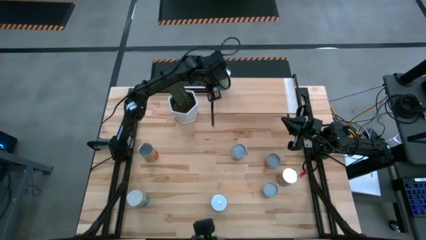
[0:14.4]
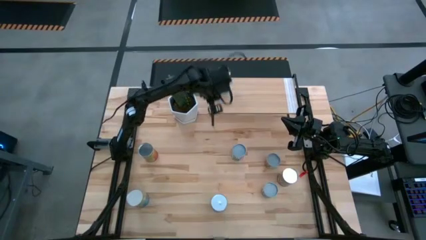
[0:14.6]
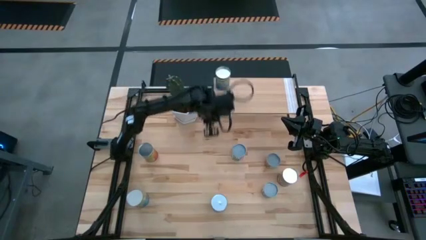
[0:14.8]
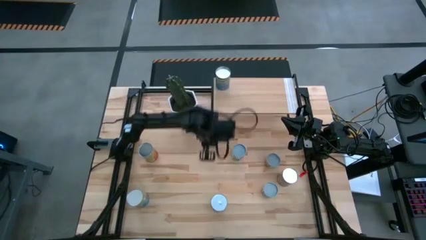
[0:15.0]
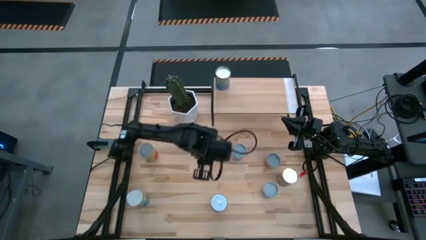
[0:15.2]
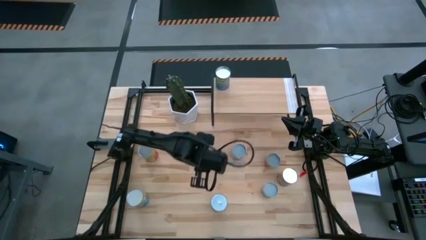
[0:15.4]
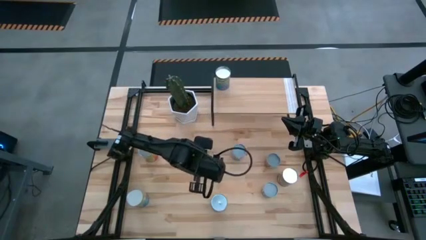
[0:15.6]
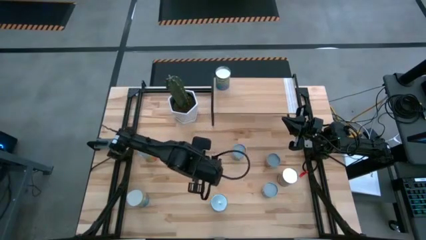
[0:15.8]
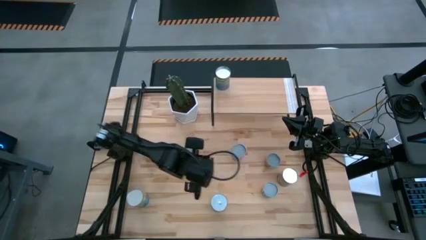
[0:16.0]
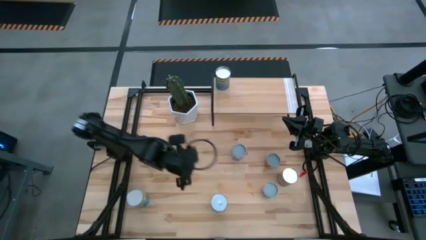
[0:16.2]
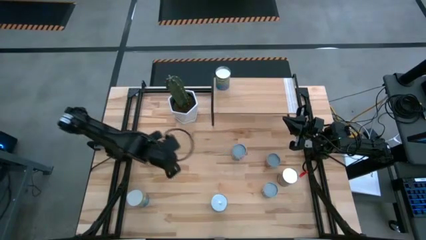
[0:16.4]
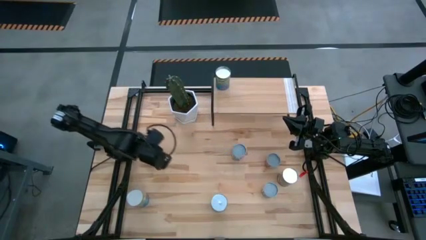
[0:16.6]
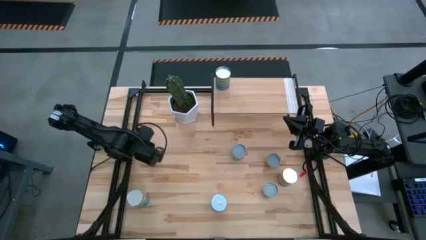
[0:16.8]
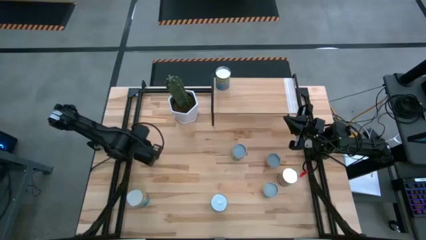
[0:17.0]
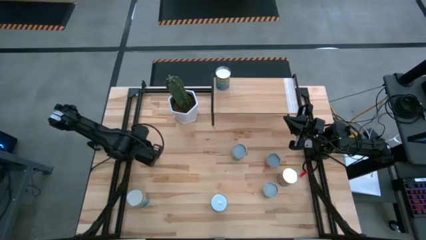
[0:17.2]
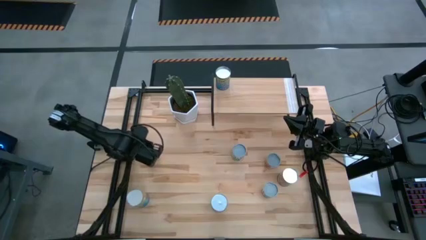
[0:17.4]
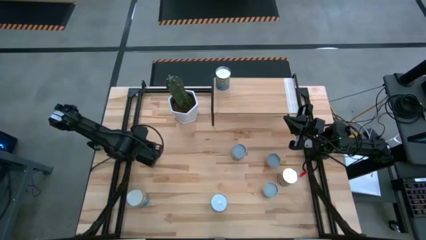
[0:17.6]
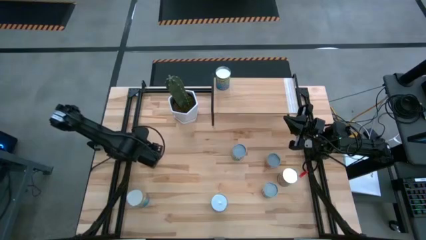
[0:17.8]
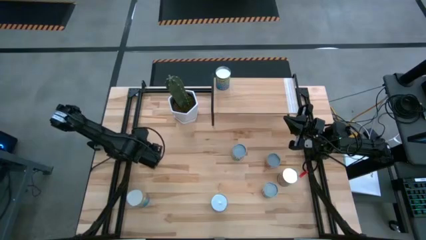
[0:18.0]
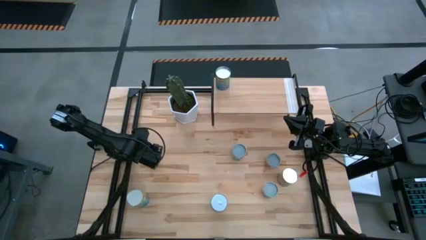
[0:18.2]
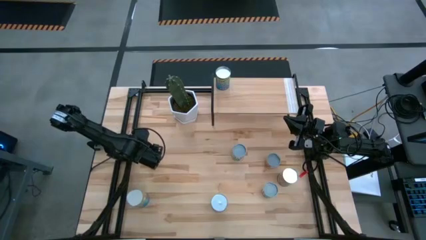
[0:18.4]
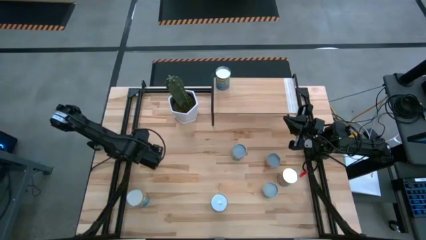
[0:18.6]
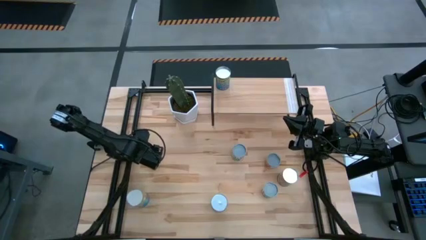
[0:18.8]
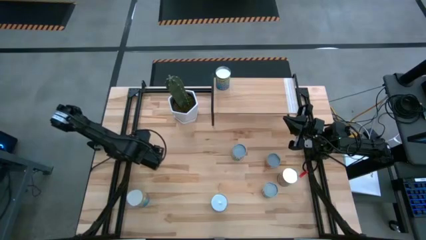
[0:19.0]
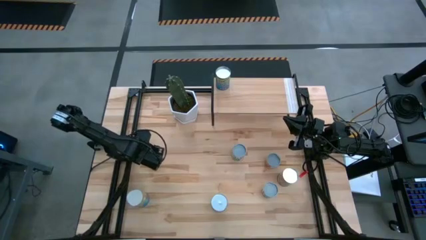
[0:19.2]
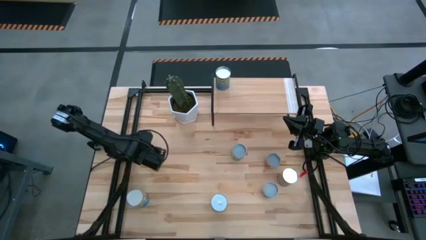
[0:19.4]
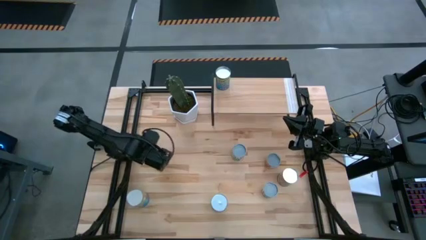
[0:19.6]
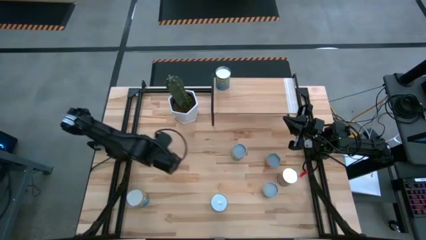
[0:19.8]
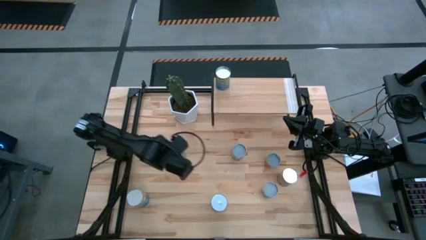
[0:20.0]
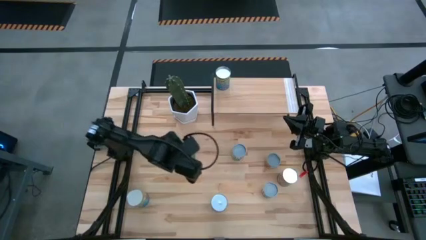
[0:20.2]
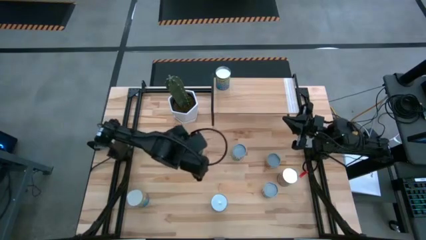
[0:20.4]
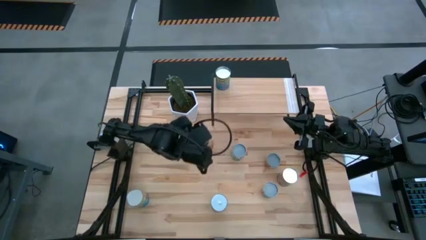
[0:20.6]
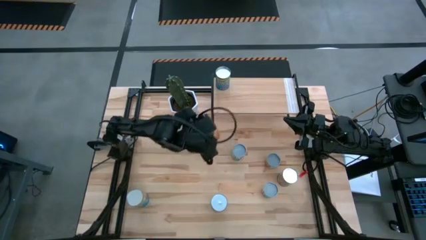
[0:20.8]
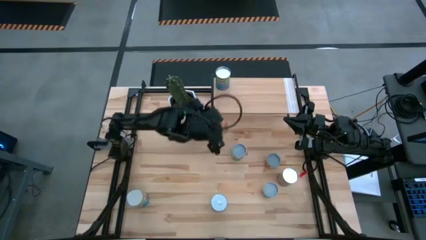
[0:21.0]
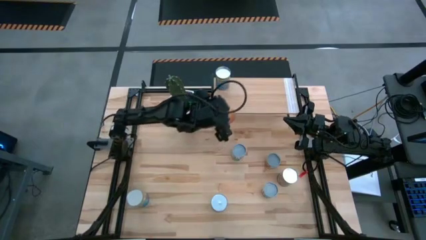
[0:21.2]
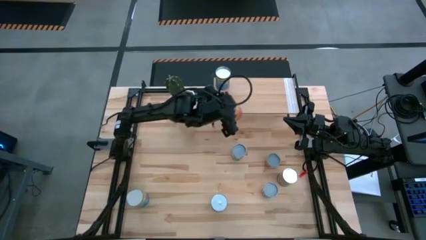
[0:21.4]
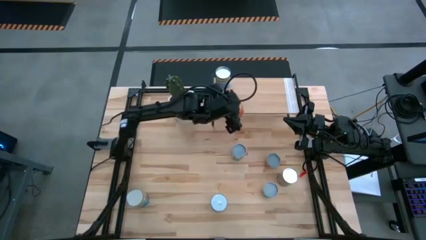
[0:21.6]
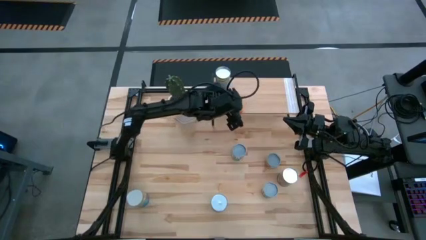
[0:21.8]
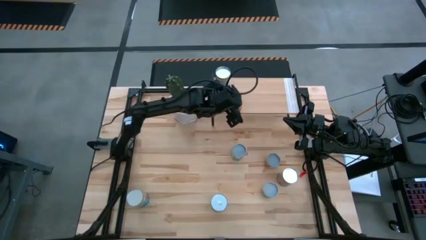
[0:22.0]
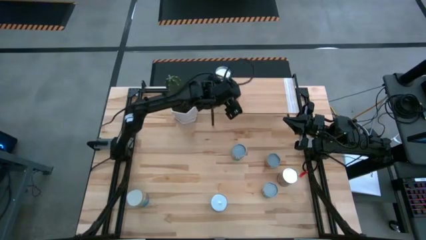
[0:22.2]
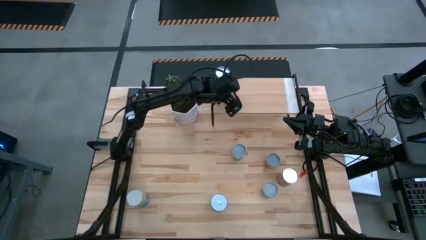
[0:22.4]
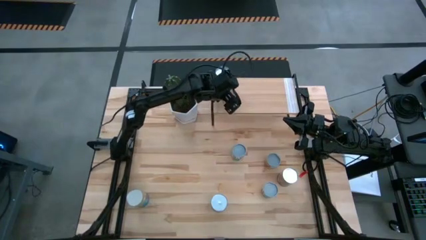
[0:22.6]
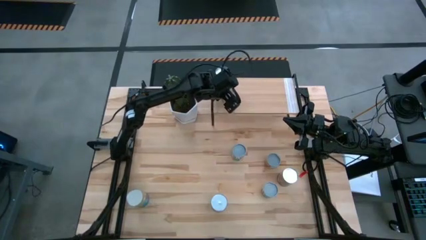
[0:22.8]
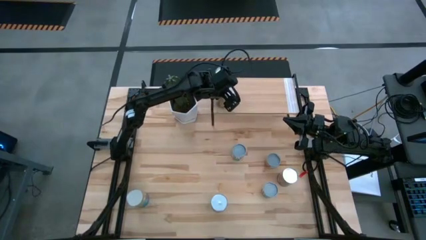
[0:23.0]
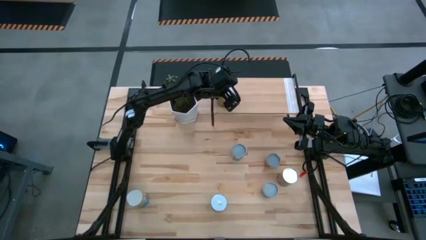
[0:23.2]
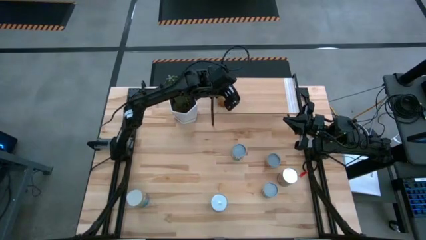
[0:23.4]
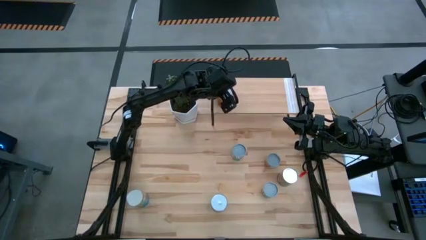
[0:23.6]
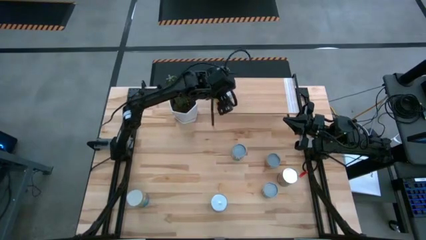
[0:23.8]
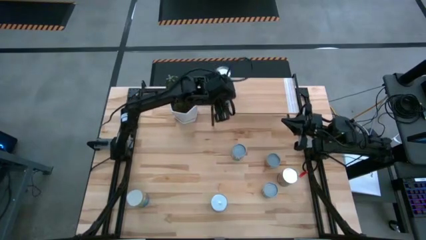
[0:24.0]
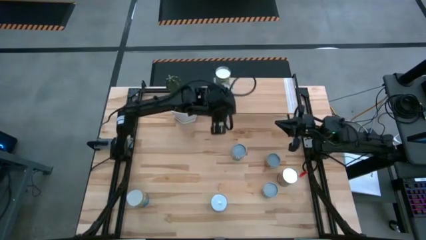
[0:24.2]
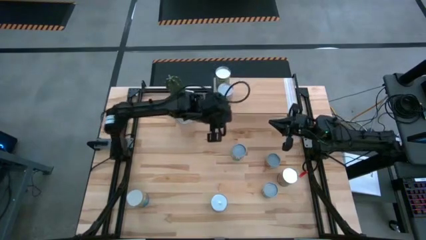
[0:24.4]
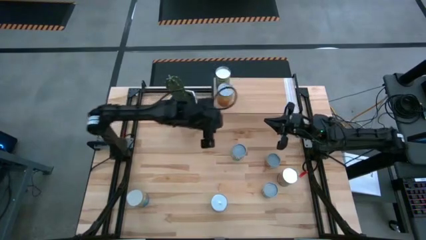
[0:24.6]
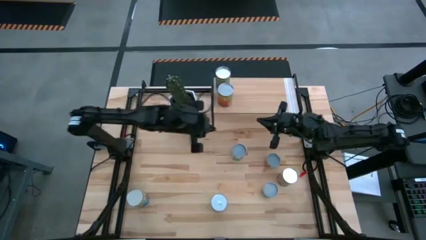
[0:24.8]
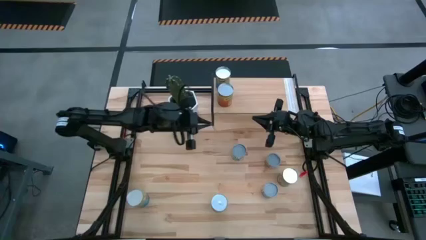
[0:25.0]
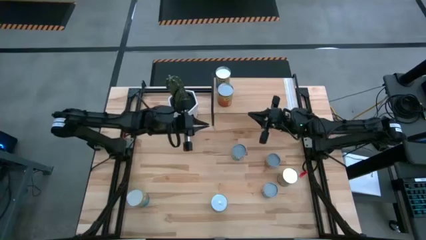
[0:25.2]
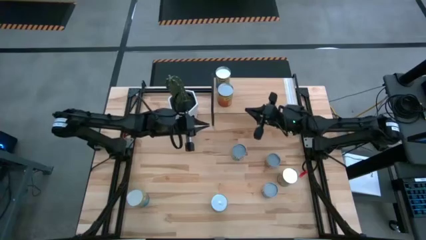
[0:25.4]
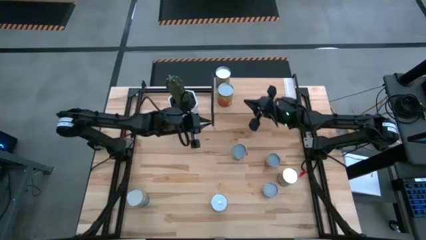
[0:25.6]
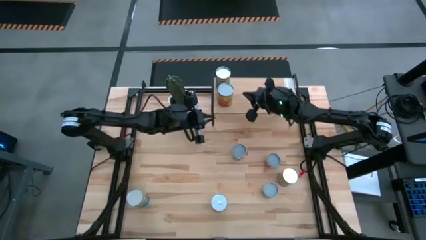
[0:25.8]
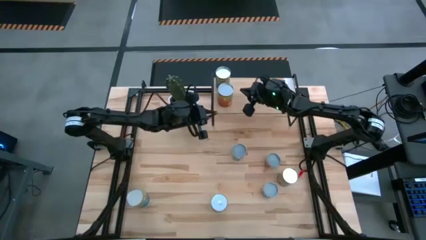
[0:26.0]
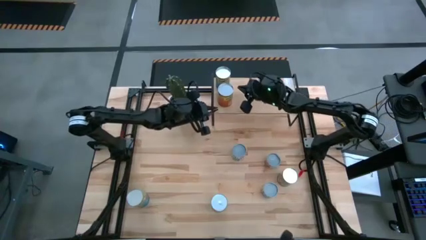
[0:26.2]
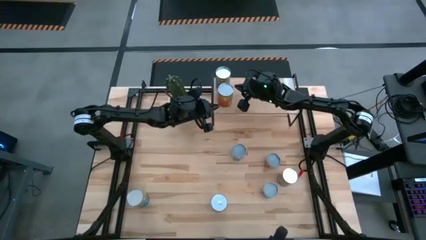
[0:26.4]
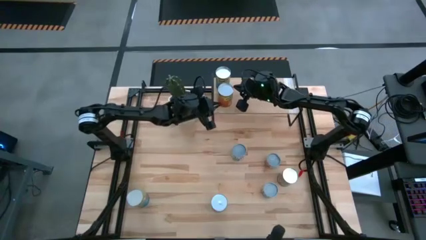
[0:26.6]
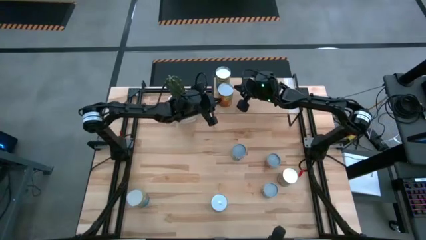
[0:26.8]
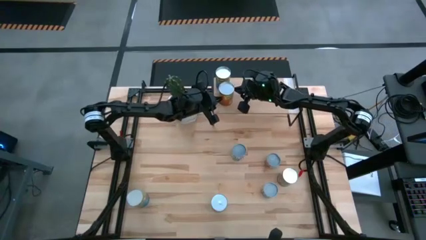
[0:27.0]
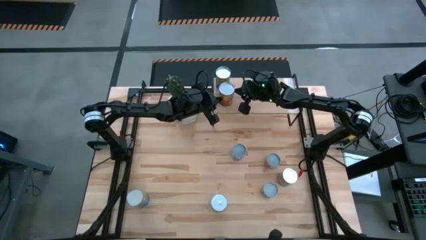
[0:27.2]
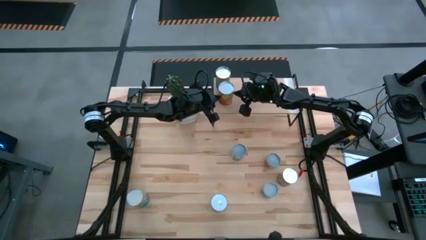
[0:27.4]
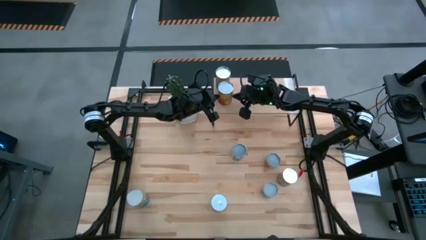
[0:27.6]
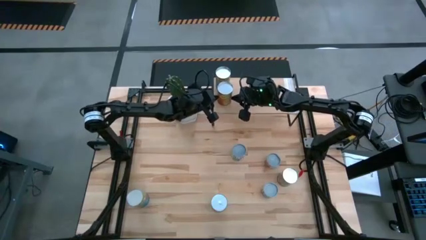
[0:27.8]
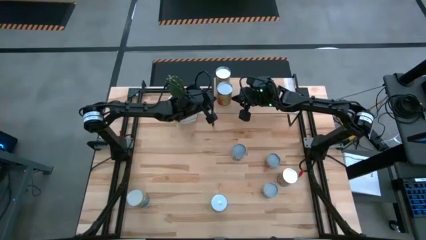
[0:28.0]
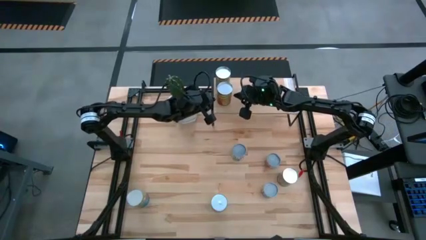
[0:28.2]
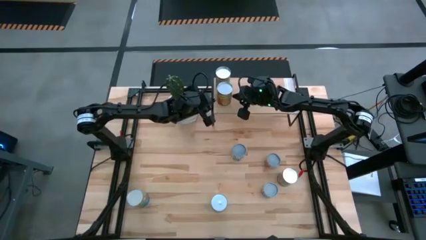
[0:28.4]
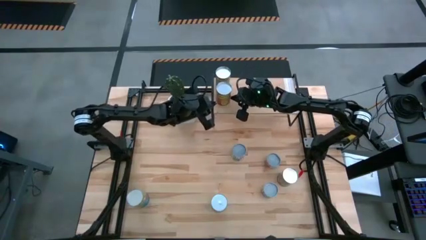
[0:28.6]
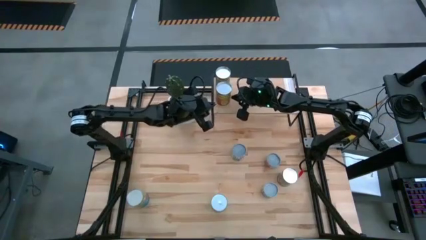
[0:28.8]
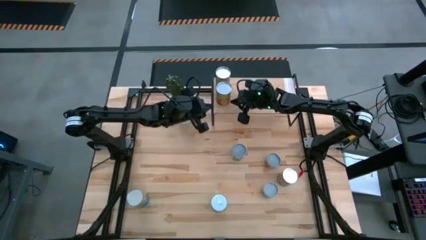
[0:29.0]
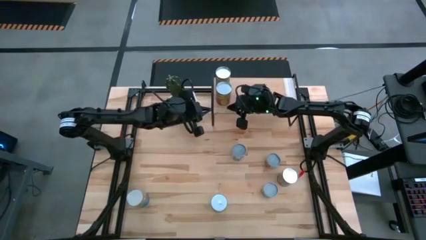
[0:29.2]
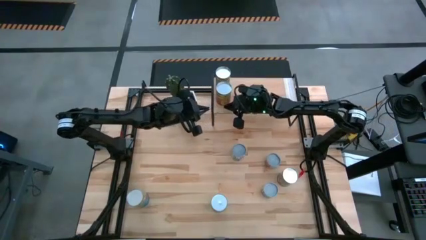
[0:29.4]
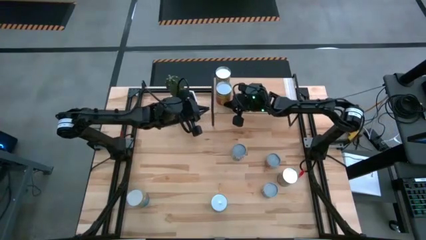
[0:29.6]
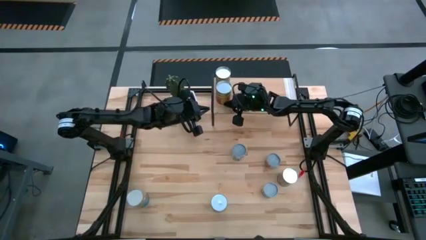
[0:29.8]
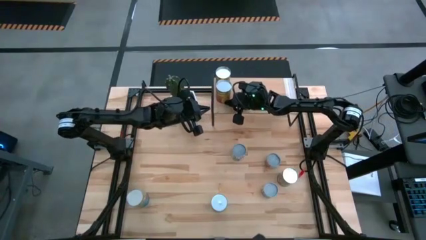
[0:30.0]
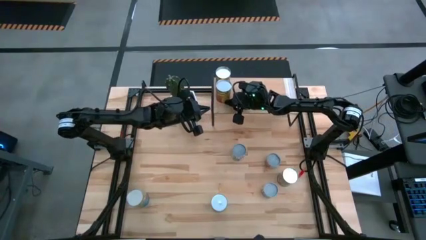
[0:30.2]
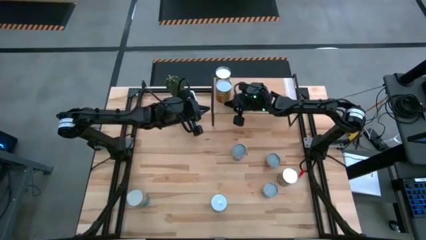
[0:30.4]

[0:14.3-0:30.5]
Task: Pick and place cans onto a shelf
Put the canned pineapple on the shelf
